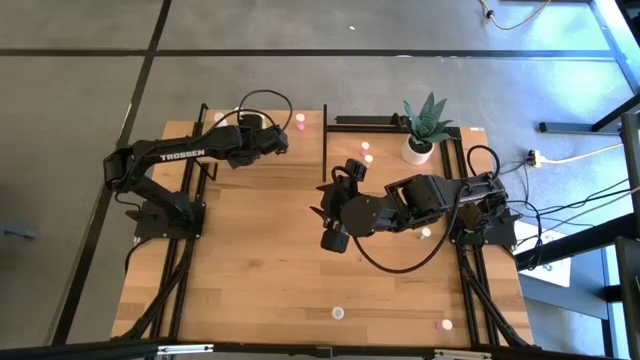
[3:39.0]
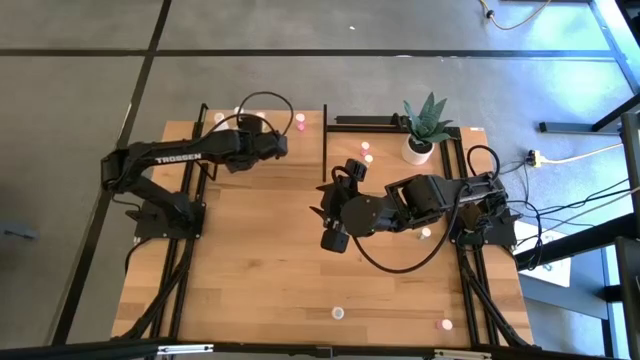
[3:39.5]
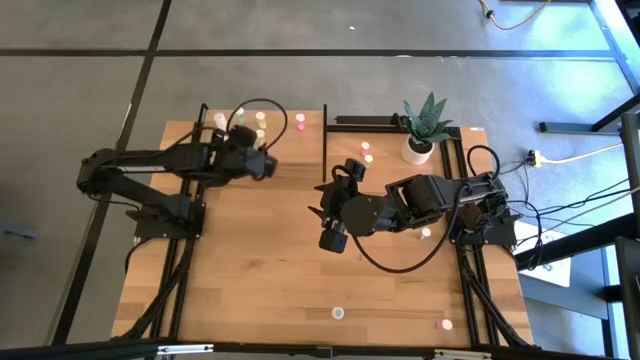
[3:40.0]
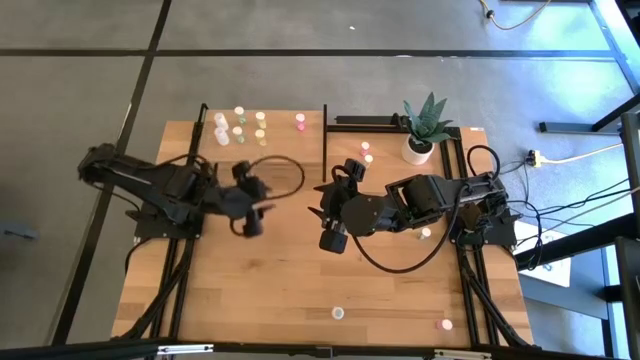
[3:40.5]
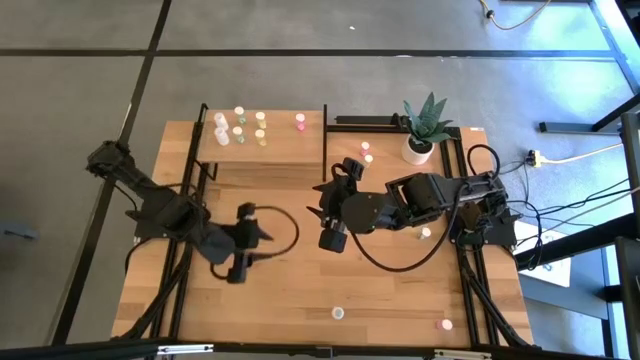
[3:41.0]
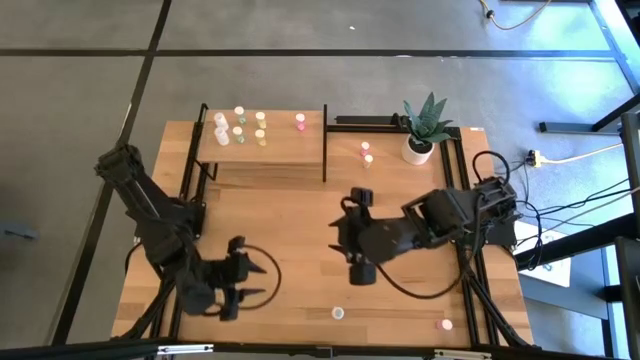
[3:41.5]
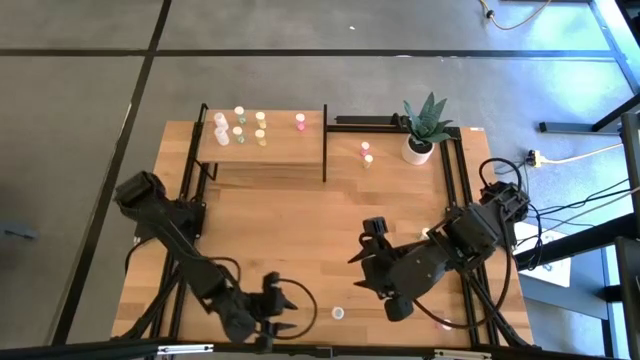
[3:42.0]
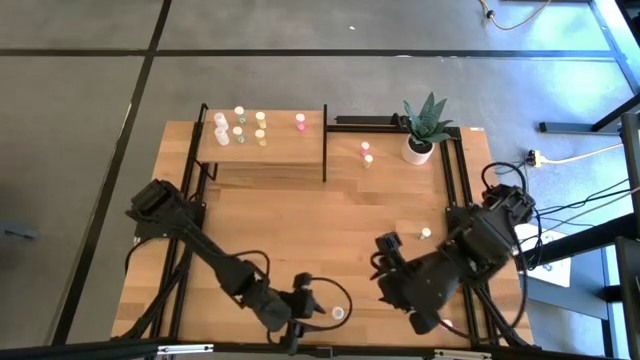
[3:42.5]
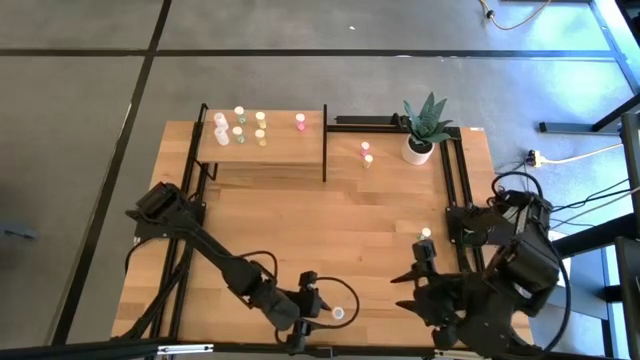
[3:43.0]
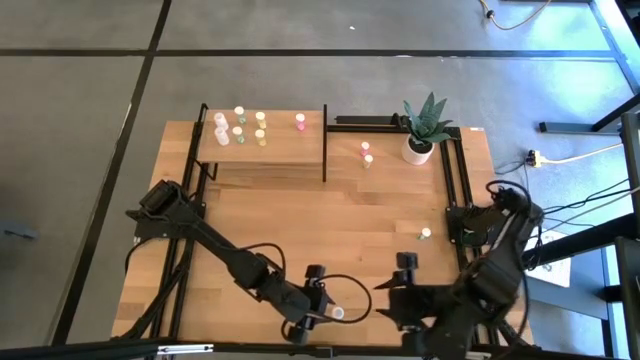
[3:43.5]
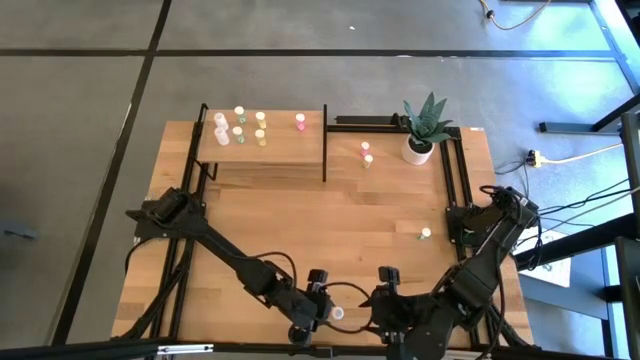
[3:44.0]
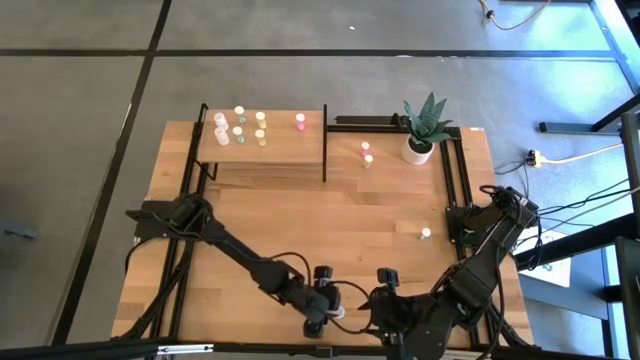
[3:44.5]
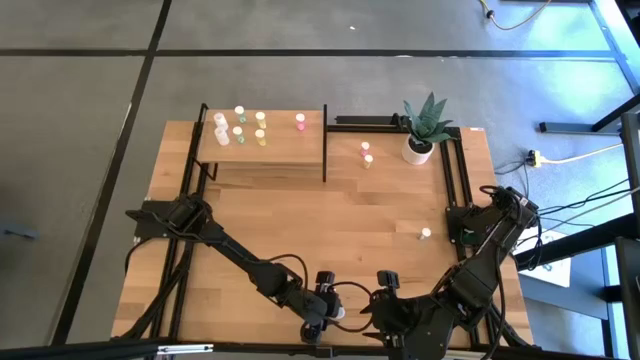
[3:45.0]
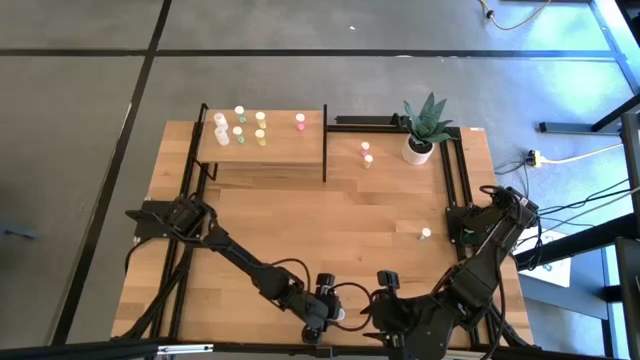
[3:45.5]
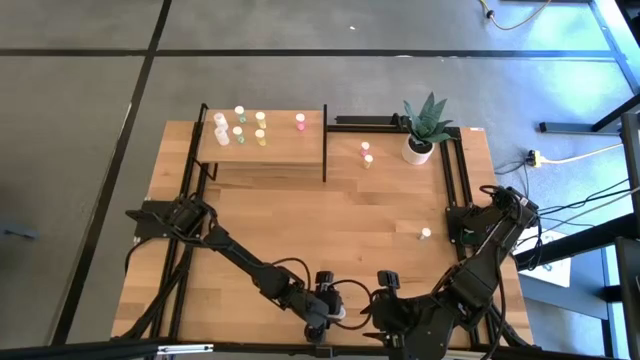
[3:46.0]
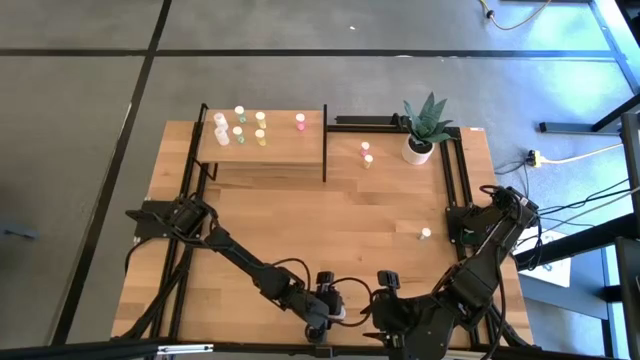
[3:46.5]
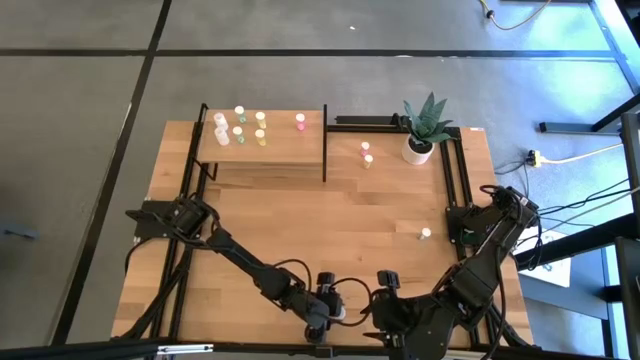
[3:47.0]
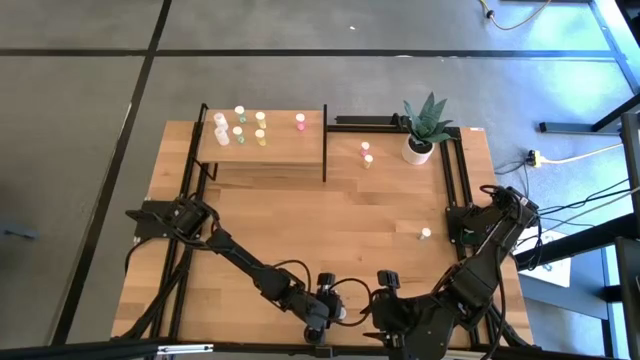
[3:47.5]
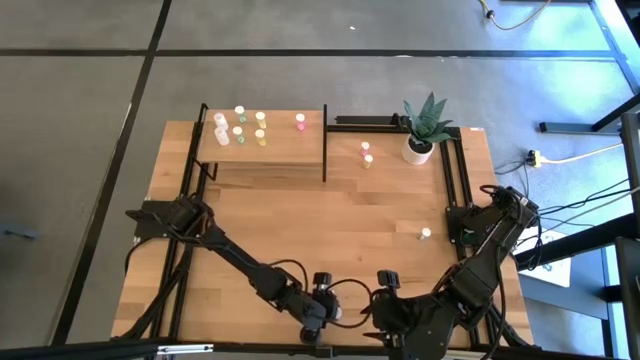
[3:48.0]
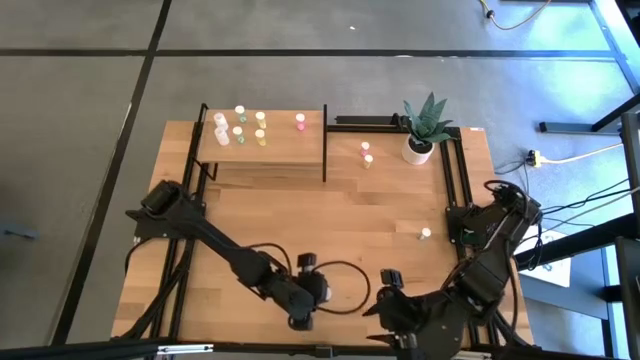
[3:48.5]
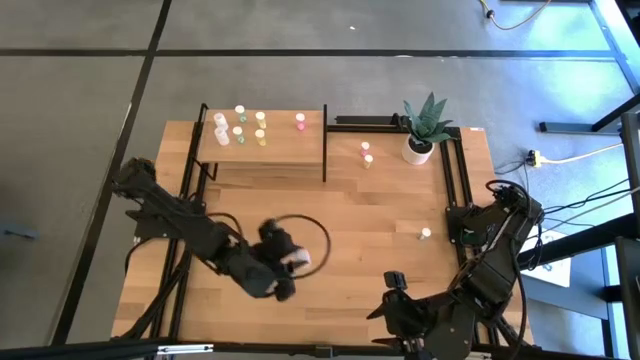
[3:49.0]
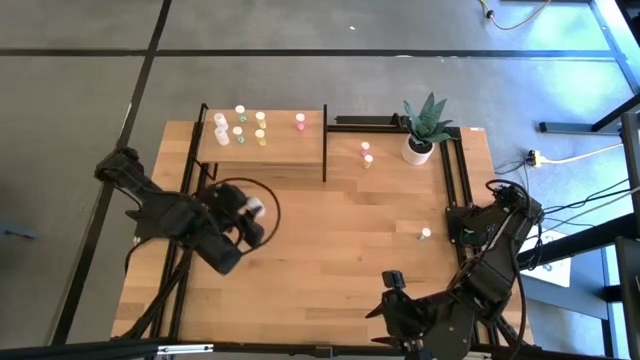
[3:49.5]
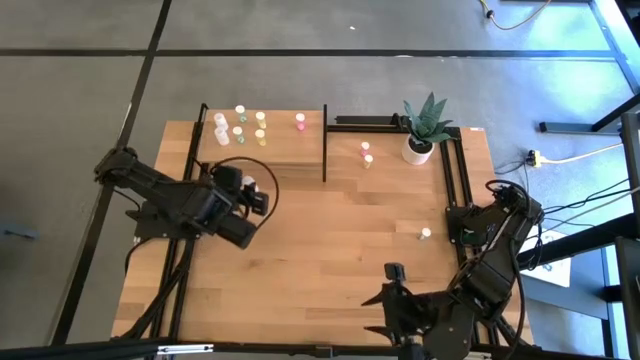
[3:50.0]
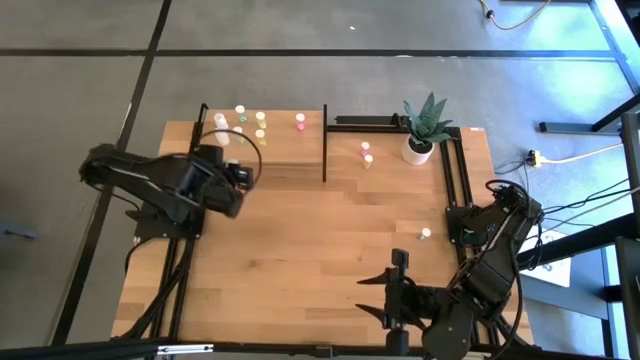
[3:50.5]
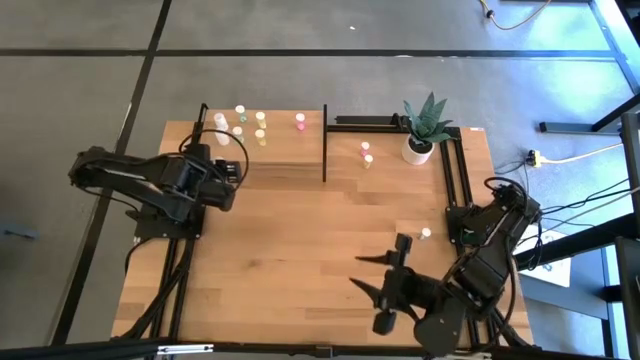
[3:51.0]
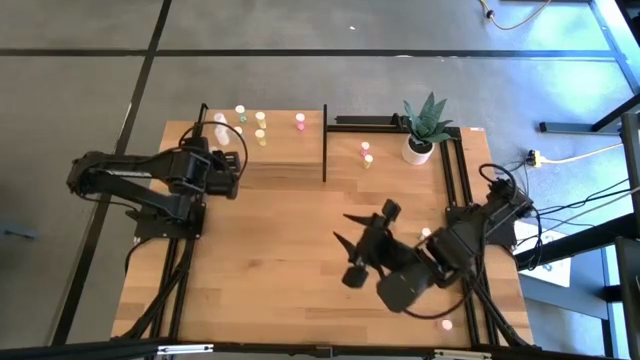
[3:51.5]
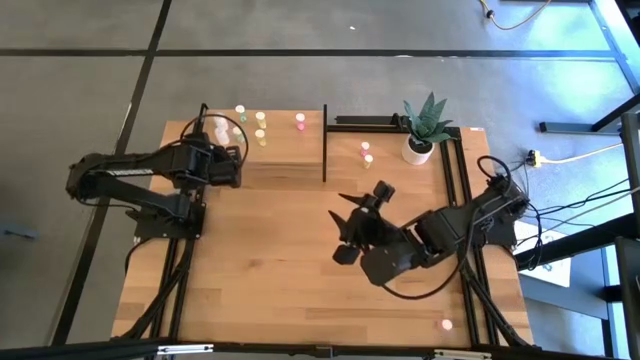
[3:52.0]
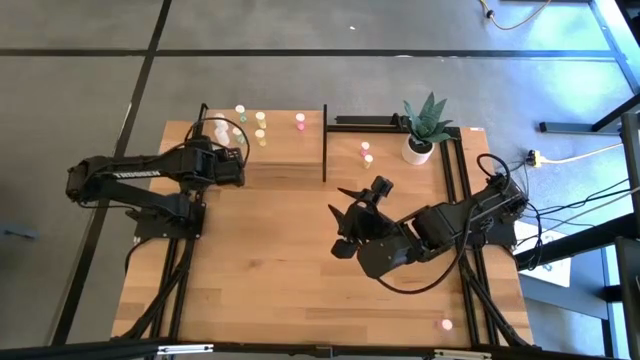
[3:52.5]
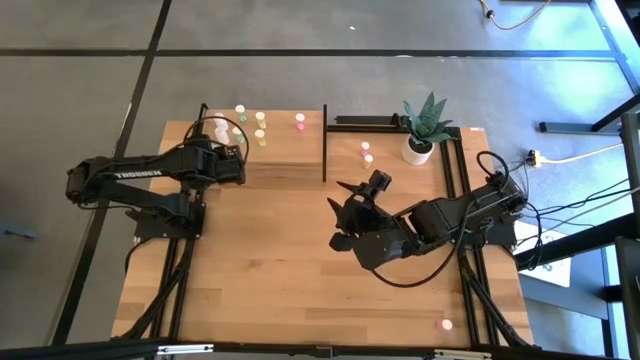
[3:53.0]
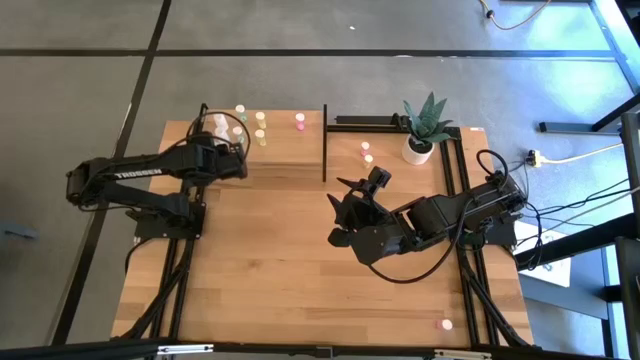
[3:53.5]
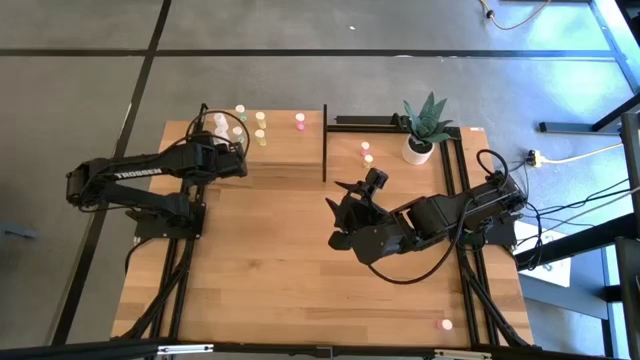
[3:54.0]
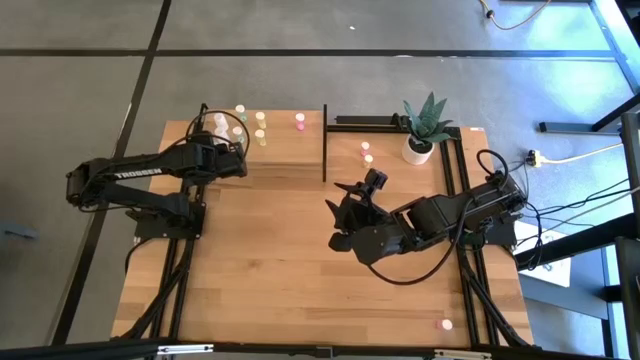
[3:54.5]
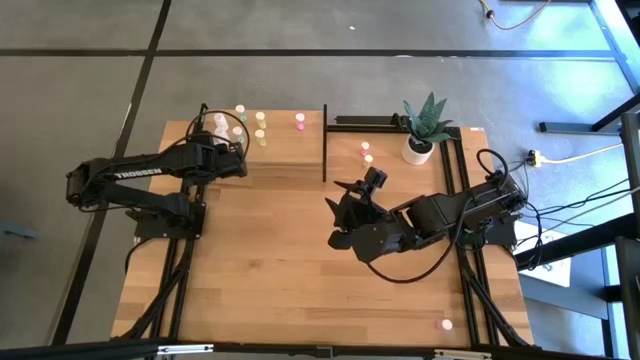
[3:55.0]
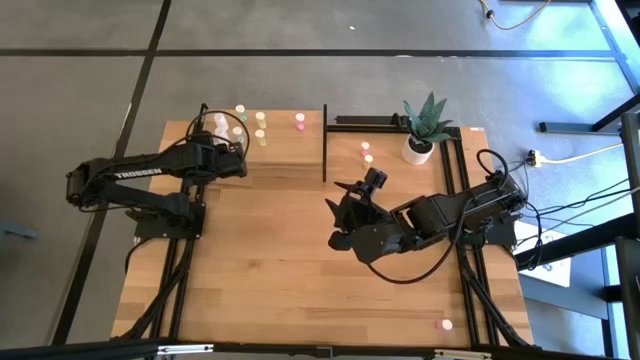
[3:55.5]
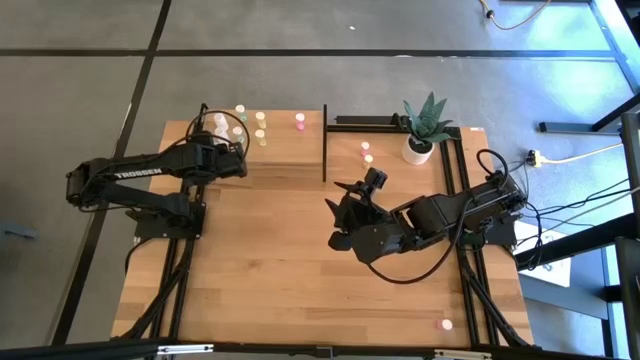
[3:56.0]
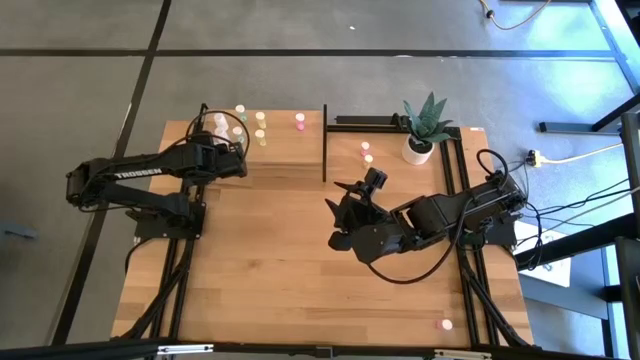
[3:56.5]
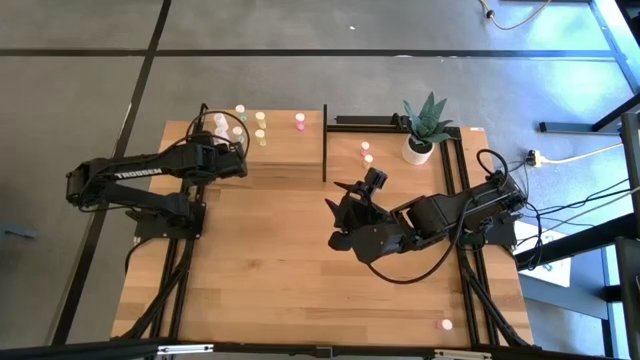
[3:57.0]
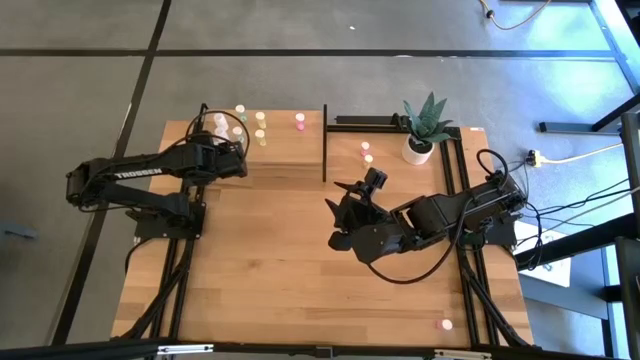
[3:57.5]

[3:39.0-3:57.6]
Task: Pick and place medicine bottles onto shelf by color
Put the top white pill bottle aligned with the other white pill bottle on the shelf
